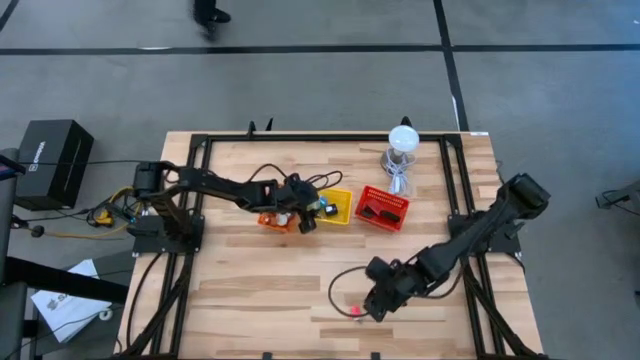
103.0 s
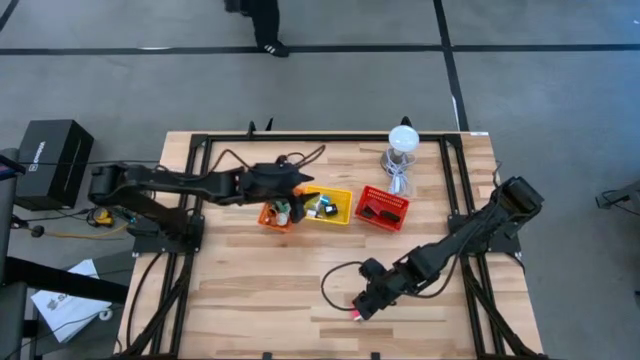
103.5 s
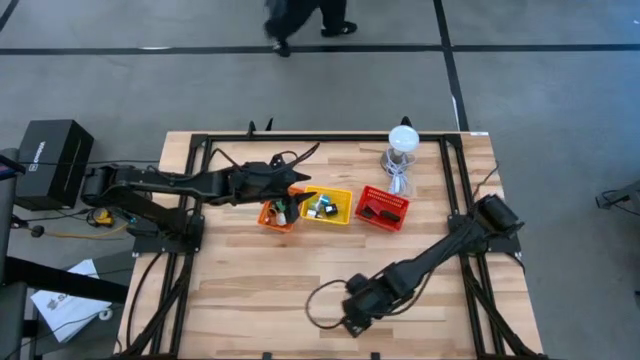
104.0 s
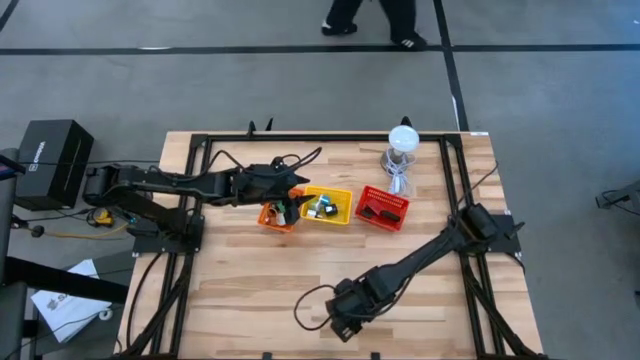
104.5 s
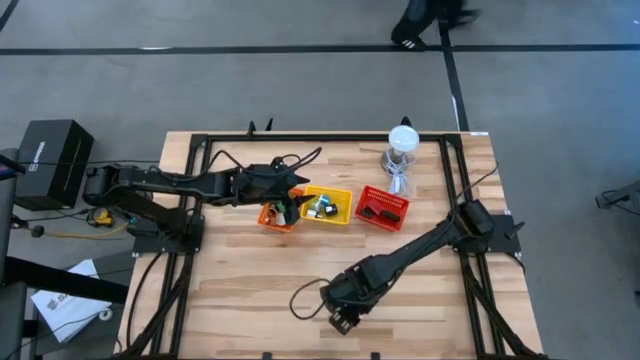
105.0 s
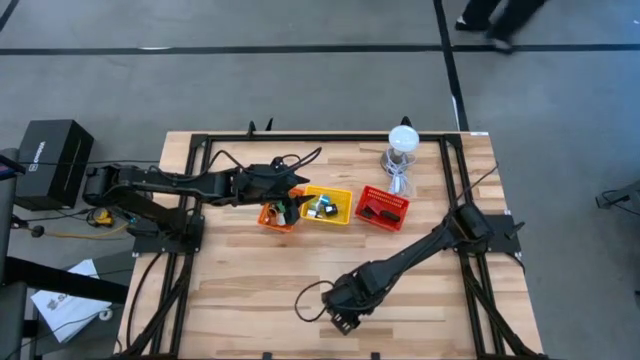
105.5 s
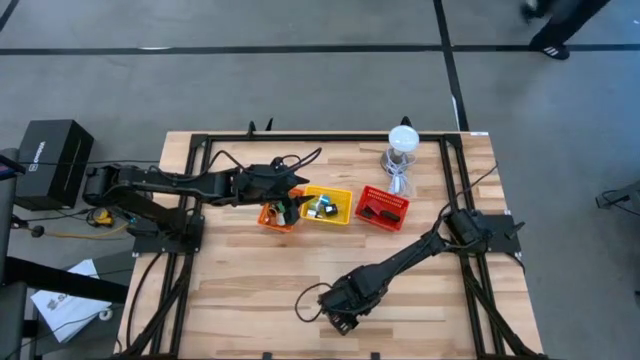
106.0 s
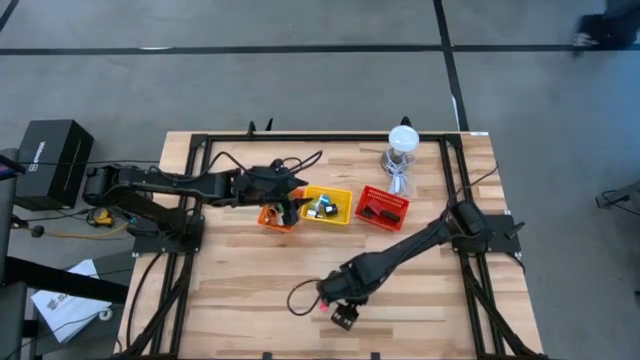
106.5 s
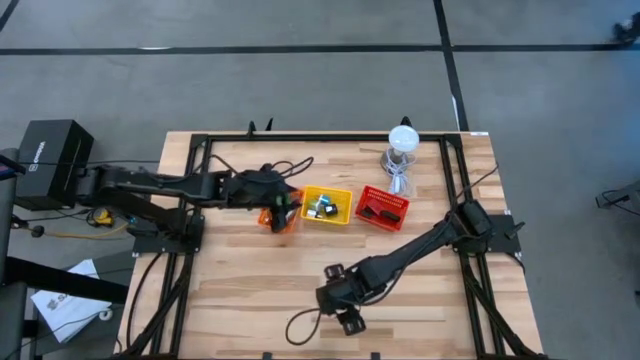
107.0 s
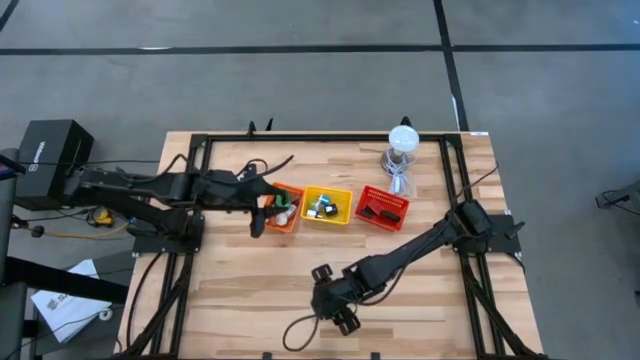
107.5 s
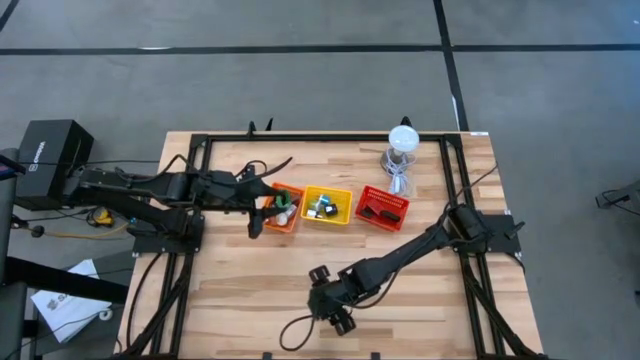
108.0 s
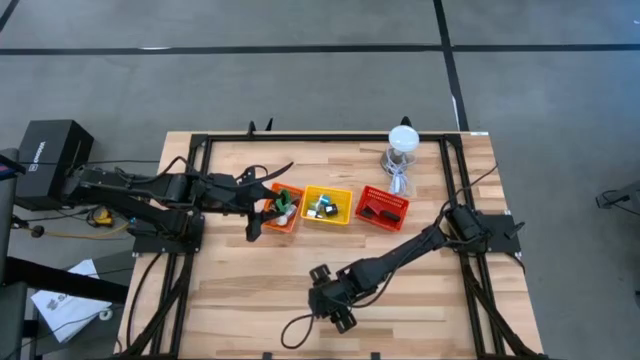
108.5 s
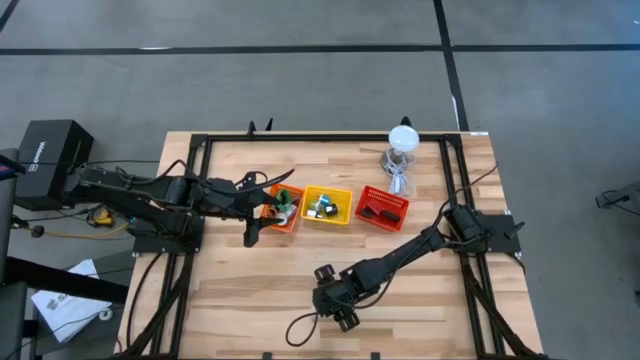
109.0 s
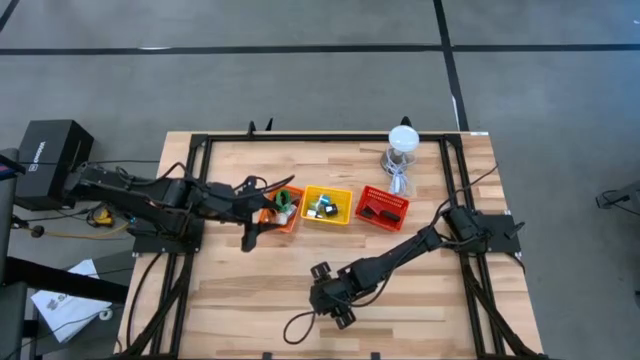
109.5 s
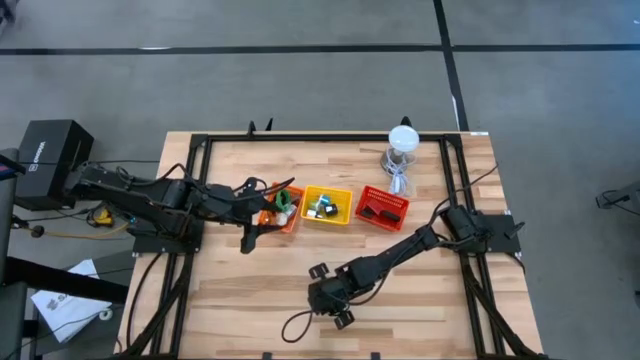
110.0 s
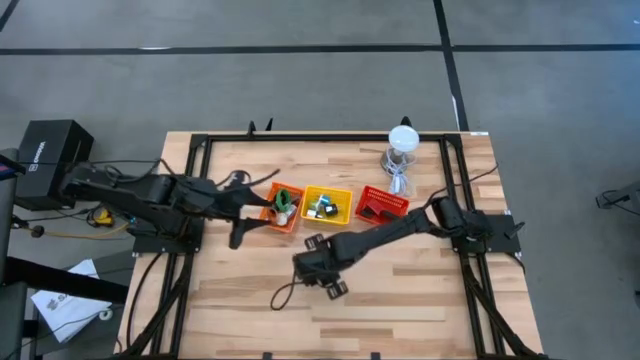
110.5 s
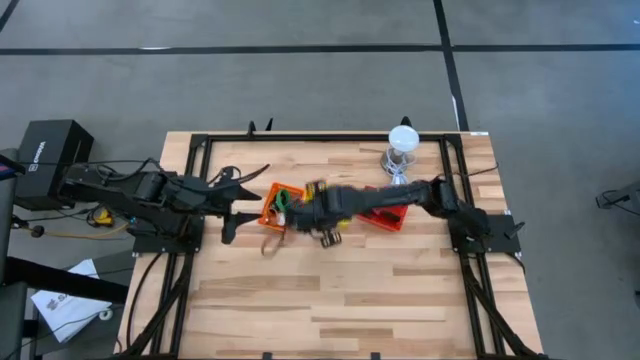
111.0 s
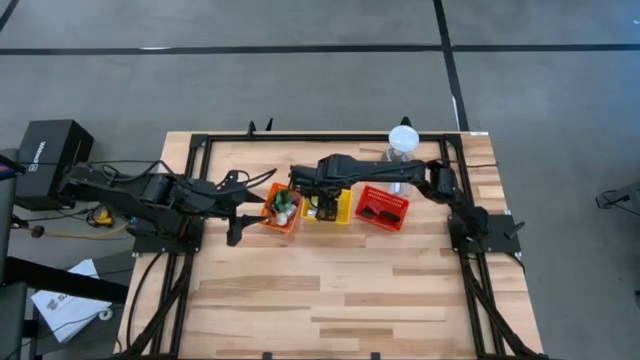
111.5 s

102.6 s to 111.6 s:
Task: Pick & Place Office items
Put the pink charger adapter into the yellow bin

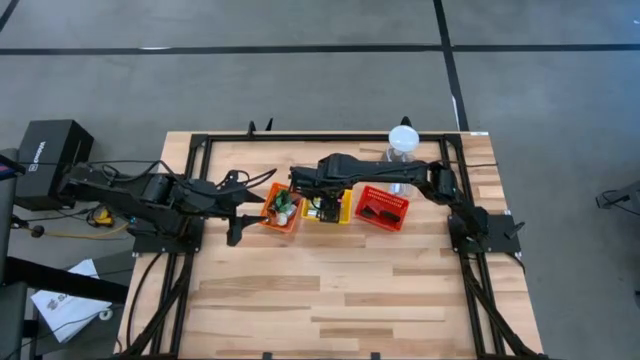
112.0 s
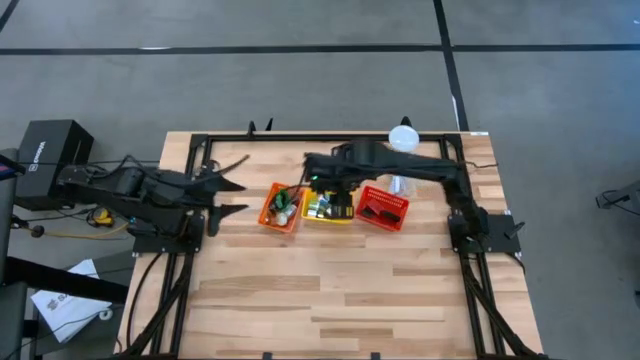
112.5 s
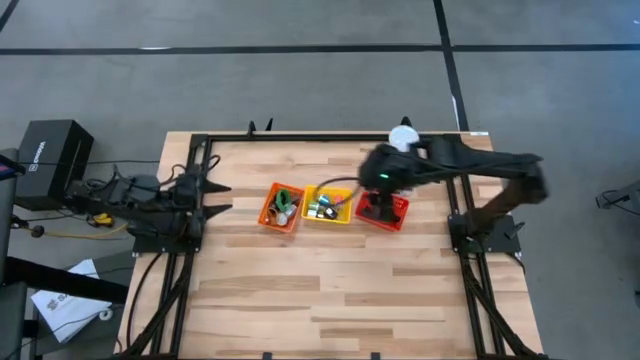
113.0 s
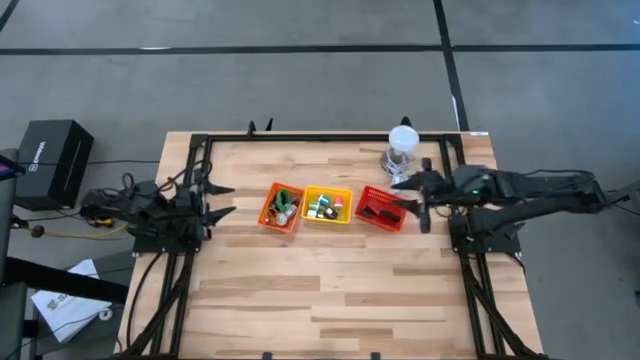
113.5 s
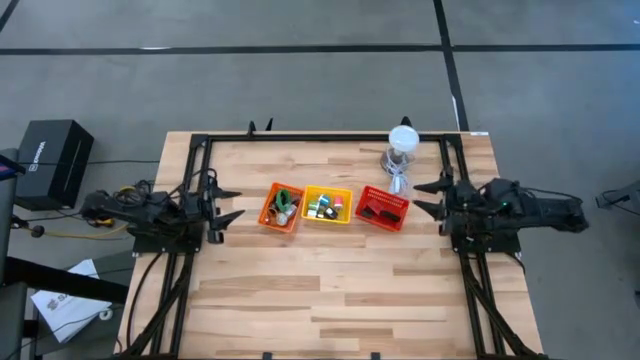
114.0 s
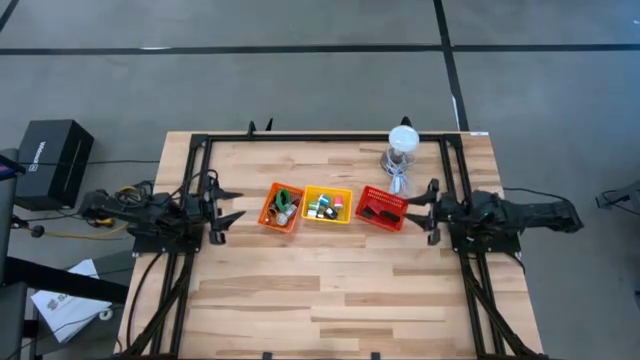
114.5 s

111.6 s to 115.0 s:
Return to Home Position

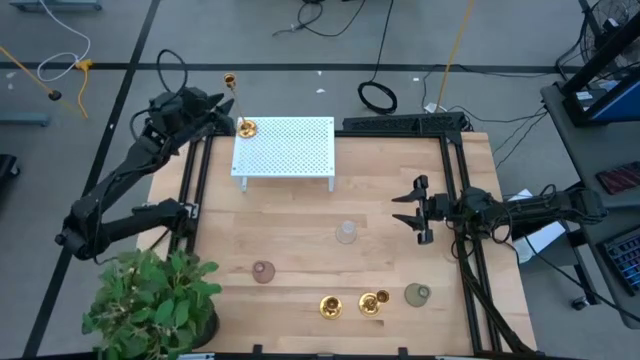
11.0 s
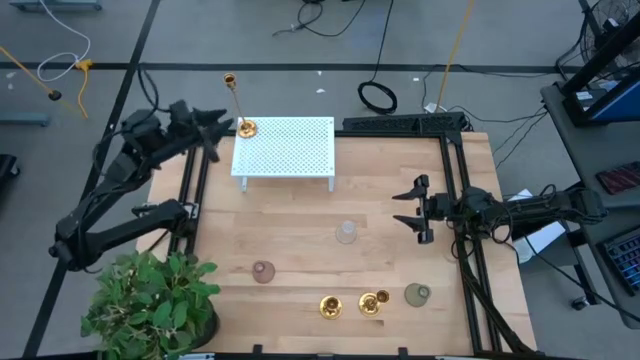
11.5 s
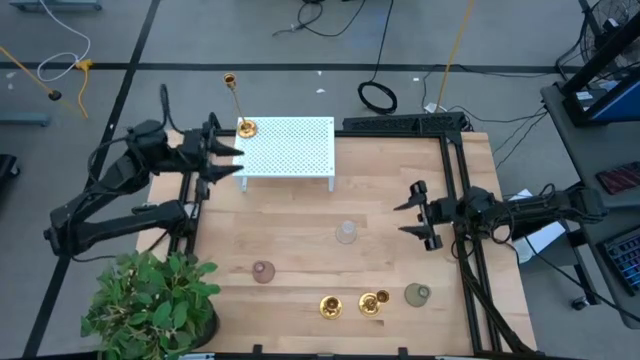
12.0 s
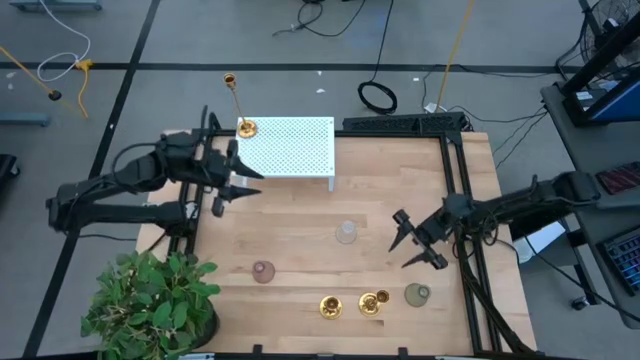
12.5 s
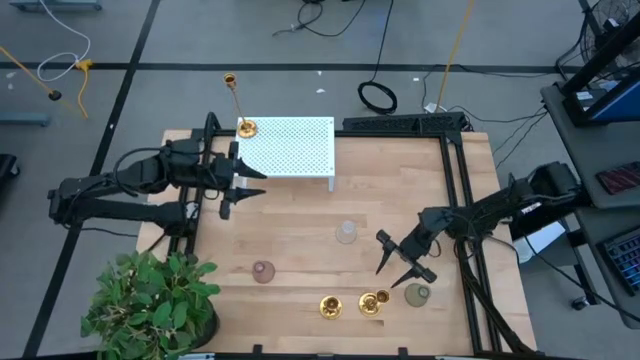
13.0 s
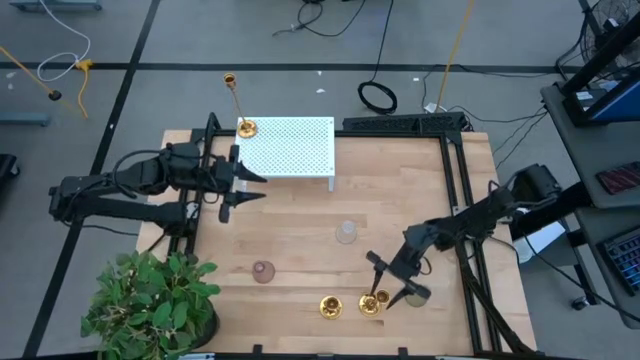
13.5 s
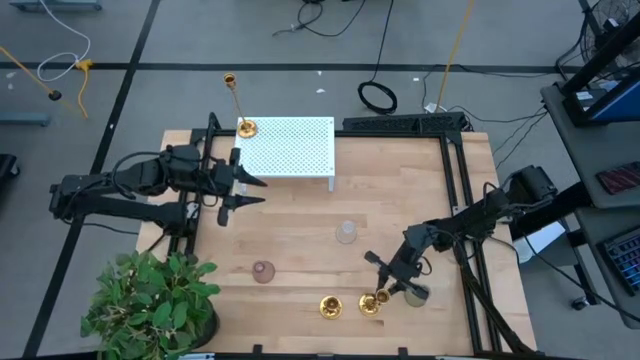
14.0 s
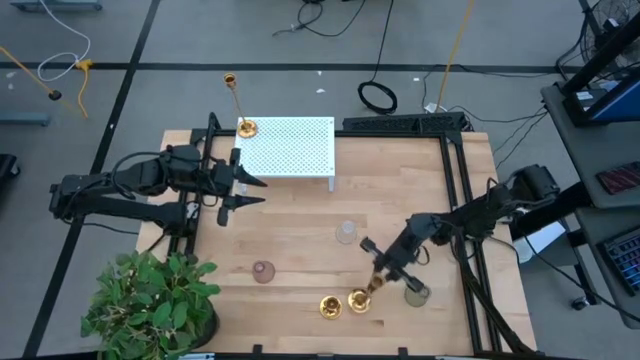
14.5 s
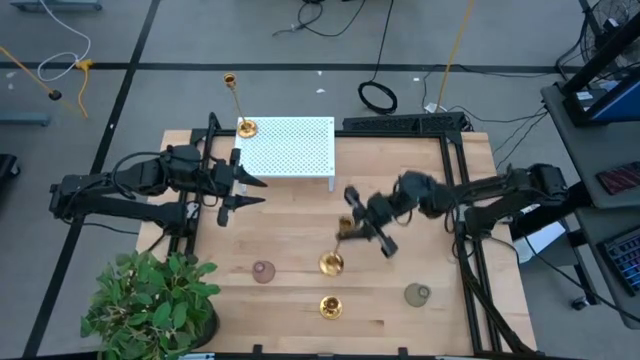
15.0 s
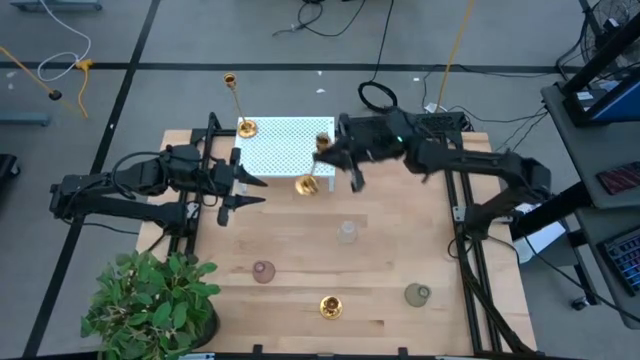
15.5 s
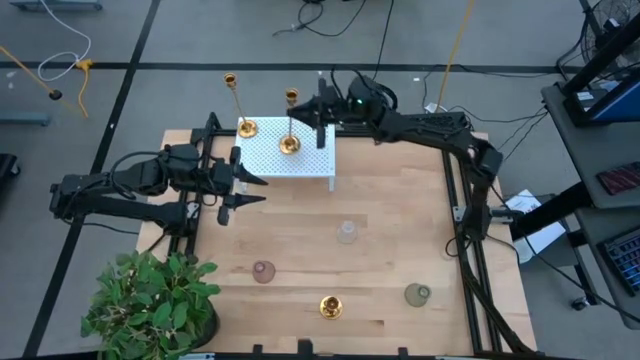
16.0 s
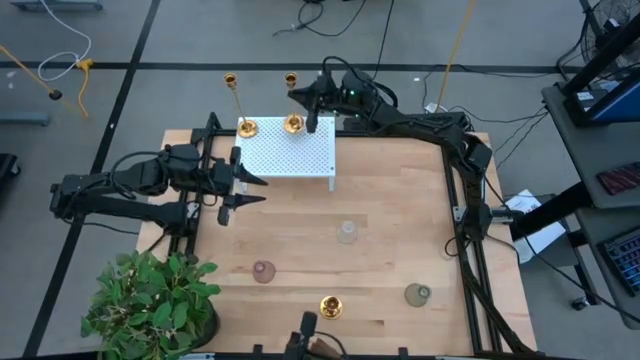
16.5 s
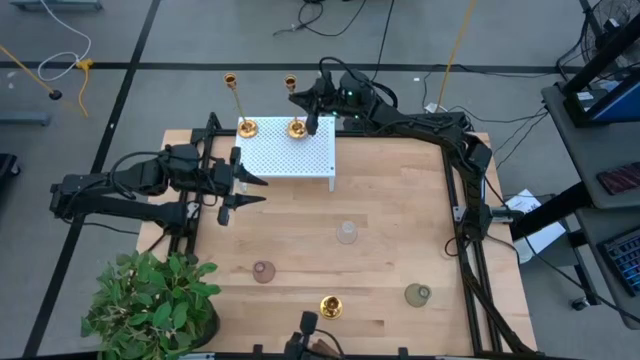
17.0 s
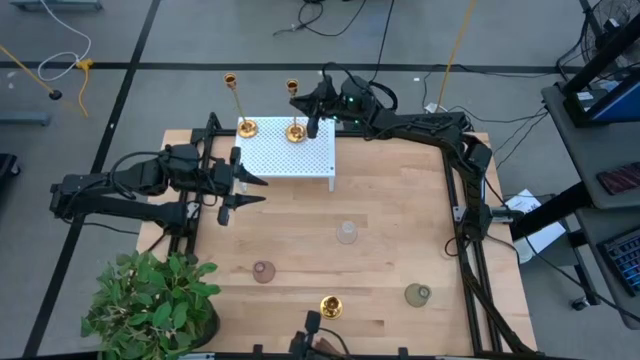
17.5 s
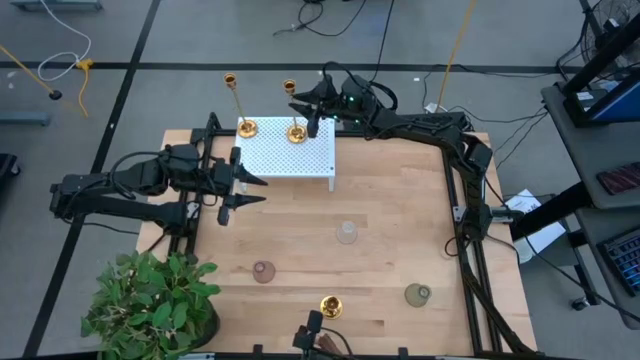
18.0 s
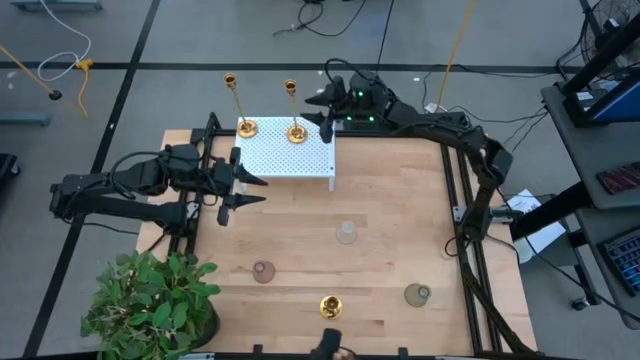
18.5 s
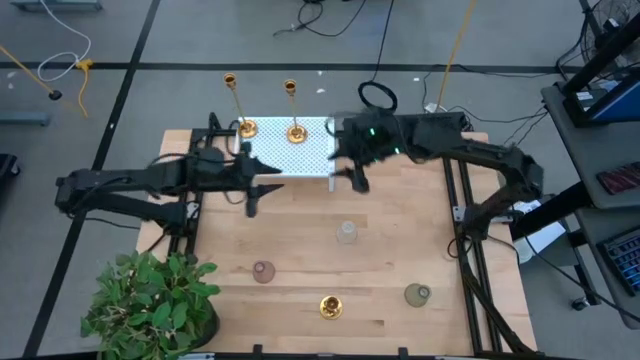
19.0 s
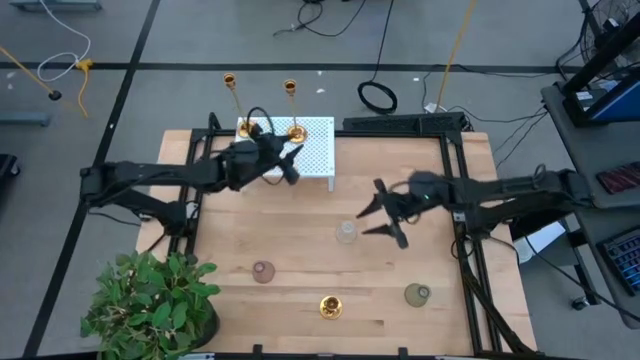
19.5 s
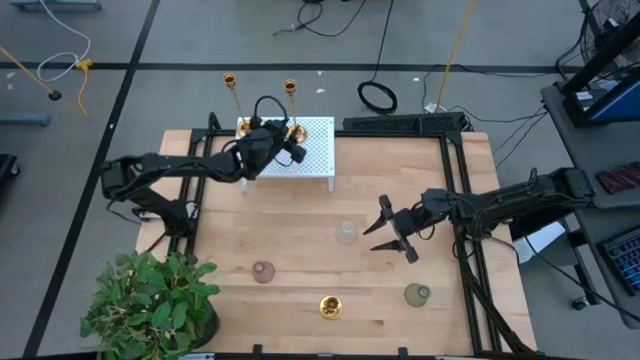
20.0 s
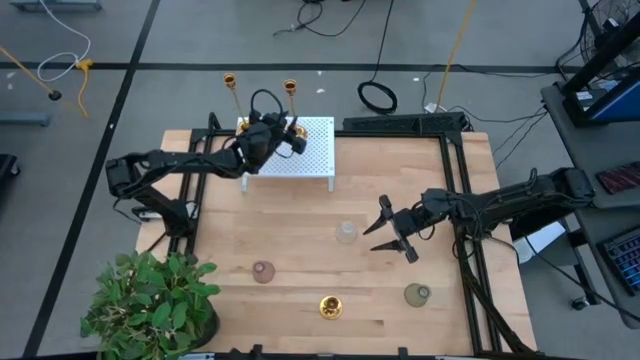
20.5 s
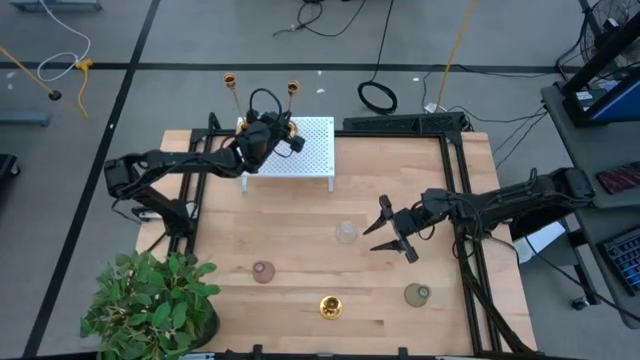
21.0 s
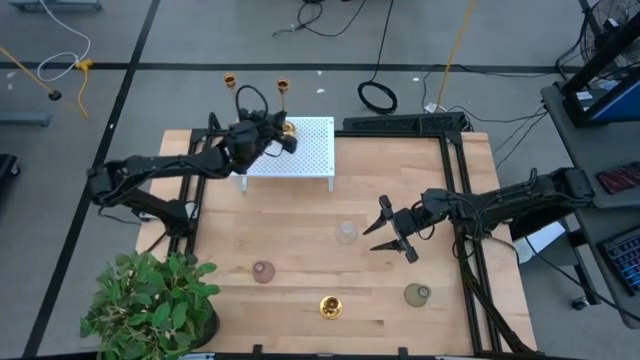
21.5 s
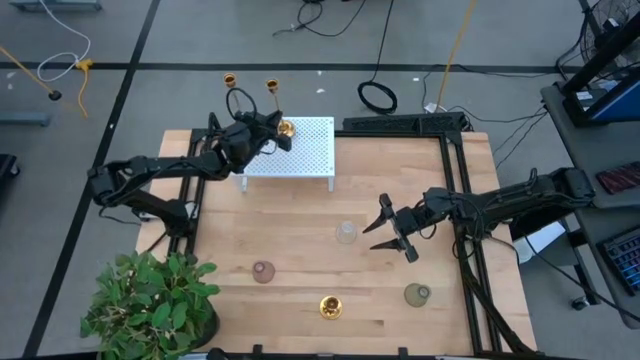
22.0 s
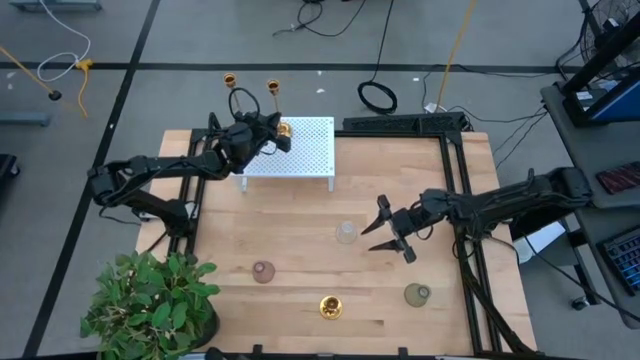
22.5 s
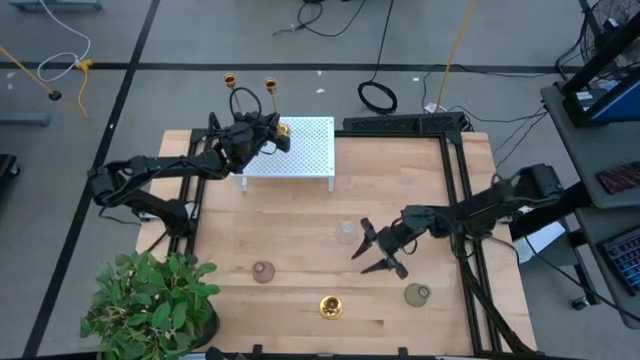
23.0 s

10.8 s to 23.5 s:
Task: Pick & Place candle stick holders
Put the right yellow candle stand on the shelf
